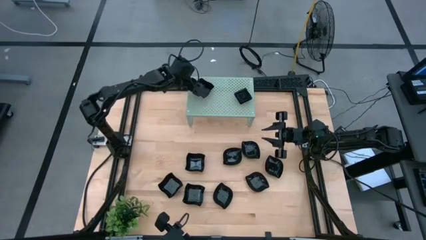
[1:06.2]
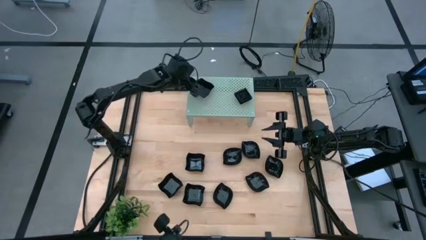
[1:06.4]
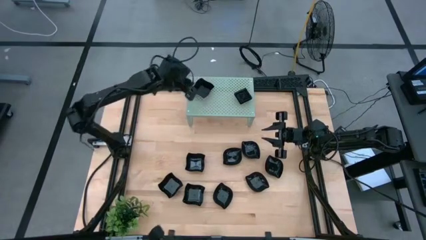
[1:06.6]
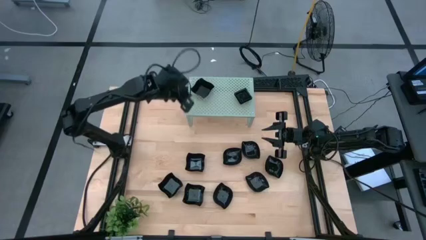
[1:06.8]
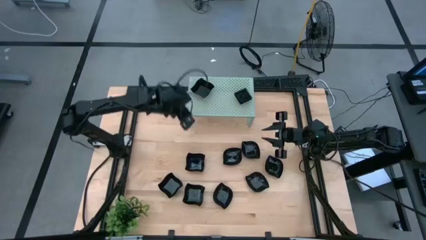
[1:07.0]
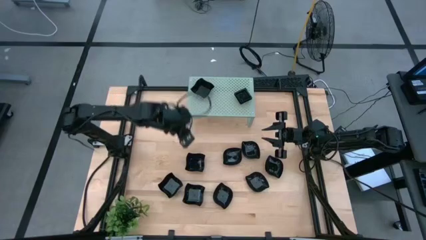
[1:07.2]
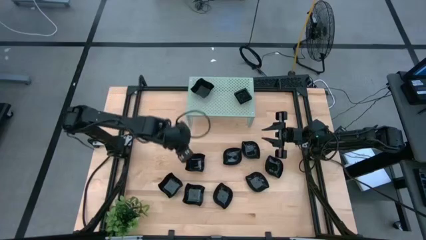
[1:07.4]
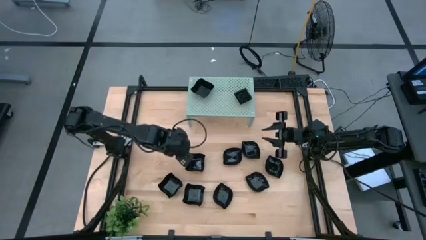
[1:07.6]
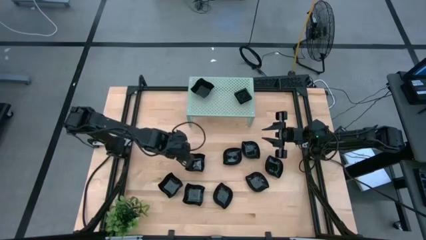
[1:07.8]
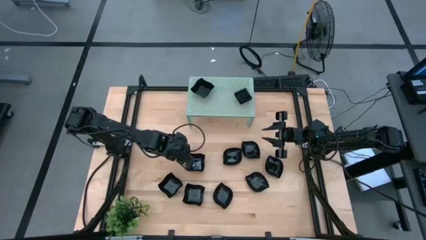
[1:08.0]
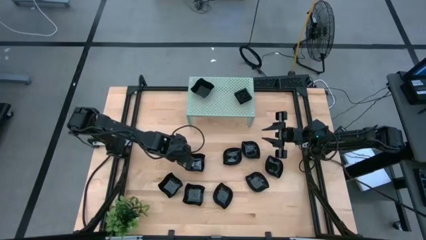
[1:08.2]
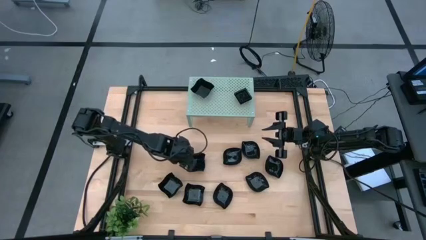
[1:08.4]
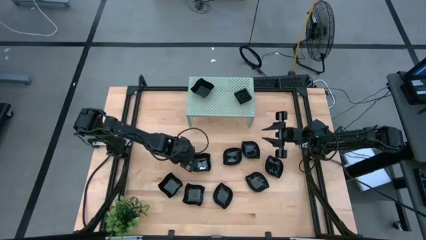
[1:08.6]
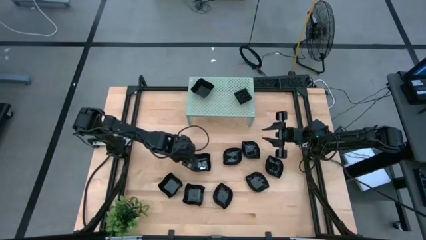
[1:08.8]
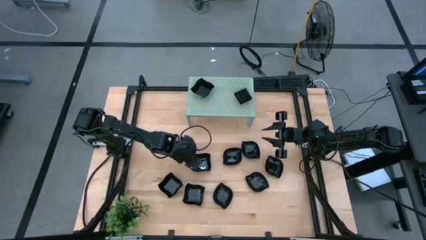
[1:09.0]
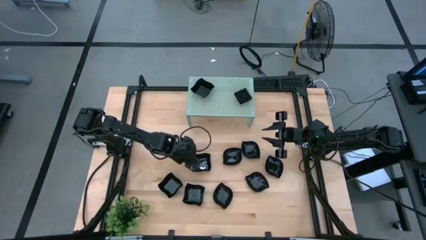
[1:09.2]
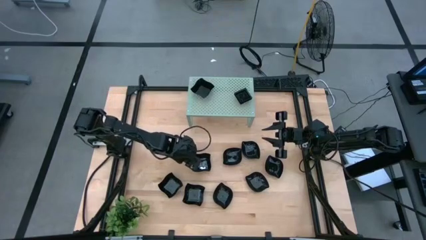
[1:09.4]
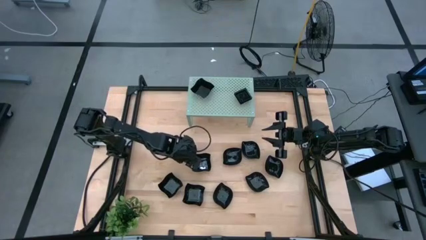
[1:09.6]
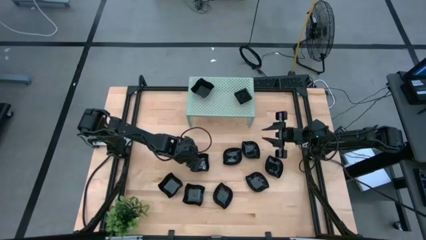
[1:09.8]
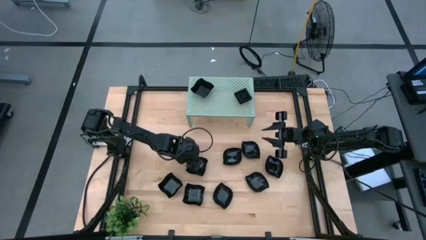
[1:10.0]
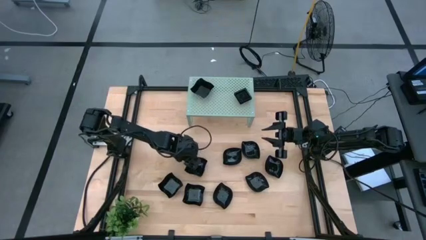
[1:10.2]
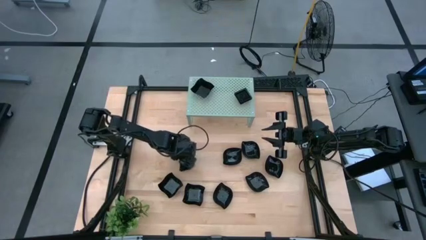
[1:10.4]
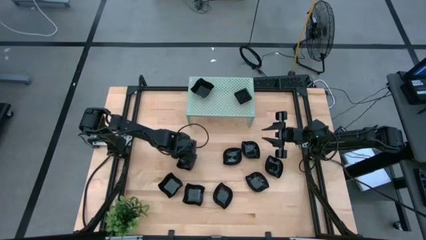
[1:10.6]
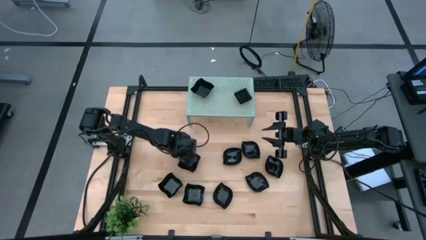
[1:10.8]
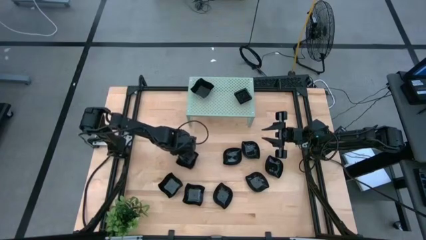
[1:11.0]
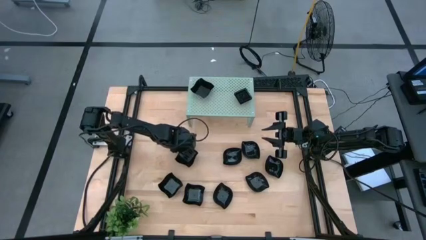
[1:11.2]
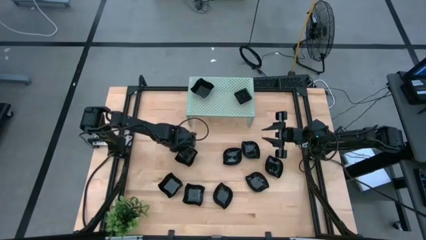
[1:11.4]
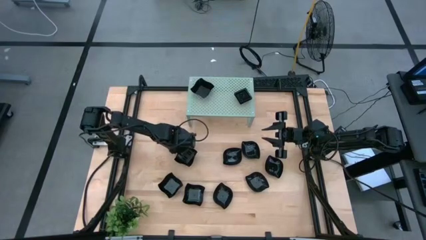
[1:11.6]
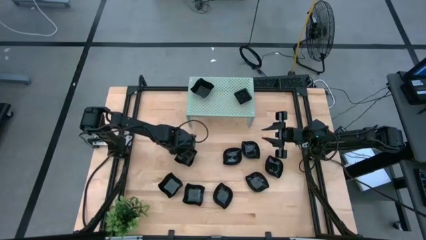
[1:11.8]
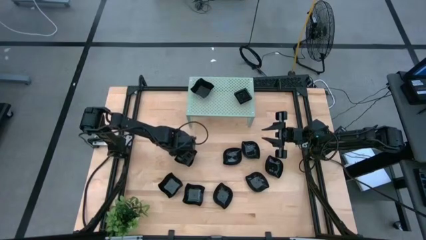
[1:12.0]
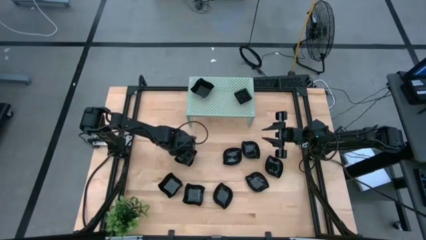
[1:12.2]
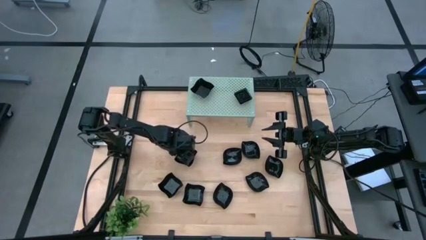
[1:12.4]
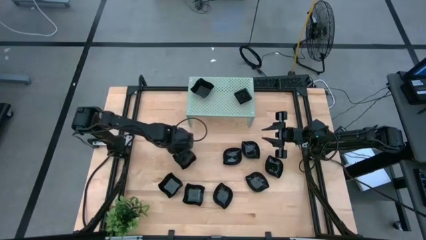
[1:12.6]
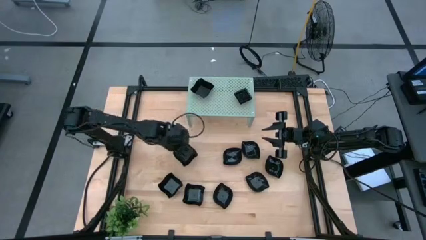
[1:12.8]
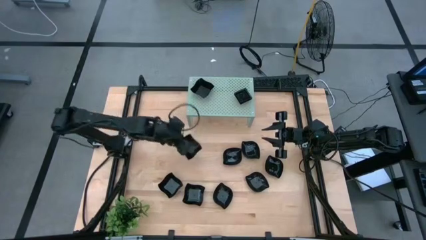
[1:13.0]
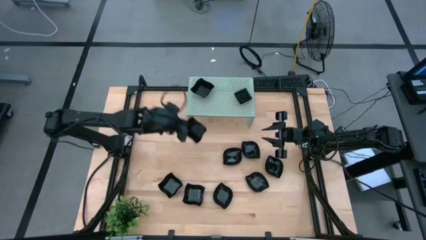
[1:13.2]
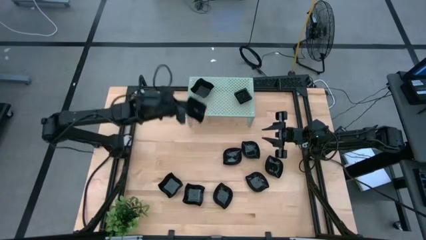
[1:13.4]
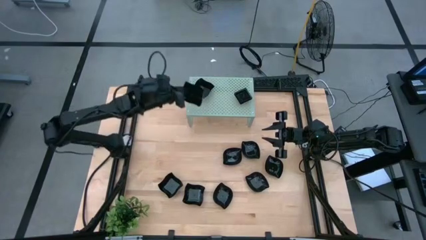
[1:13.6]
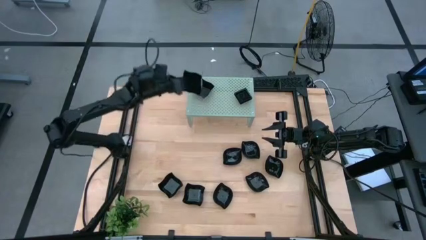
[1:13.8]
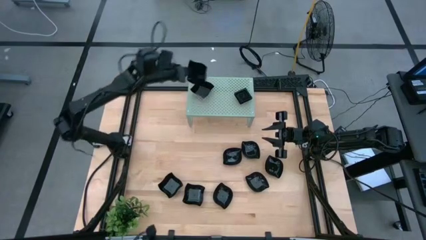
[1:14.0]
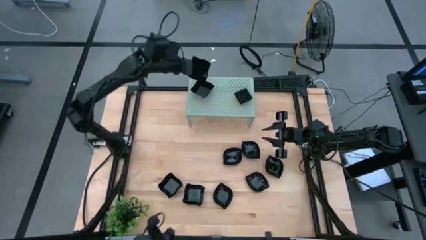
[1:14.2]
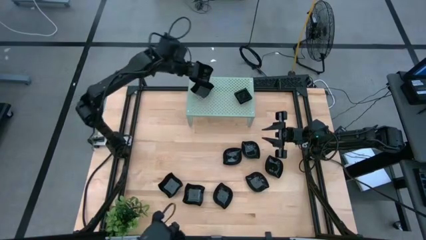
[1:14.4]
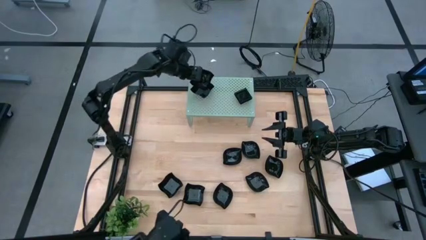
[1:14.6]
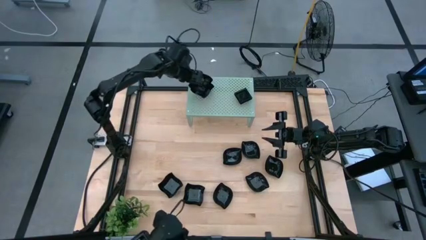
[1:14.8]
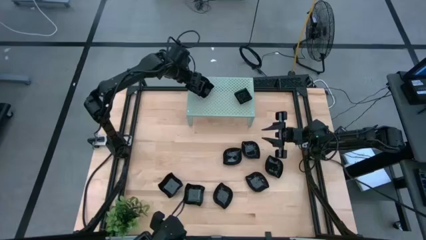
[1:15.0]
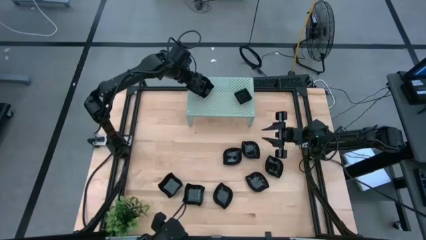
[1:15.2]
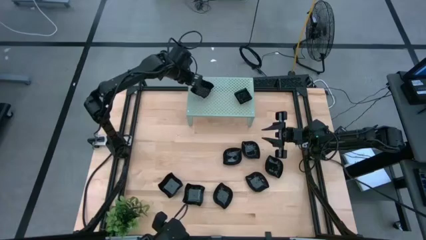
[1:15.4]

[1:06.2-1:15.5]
Task: Pick & Place Mini shaped plates
Stack the black distorted square plate on top of the other black distorted square plate on the shelf

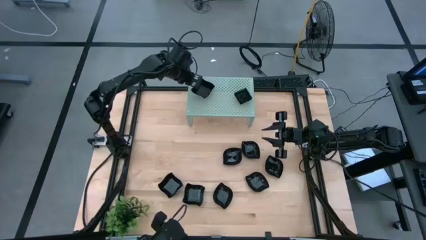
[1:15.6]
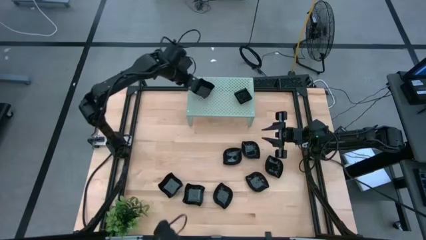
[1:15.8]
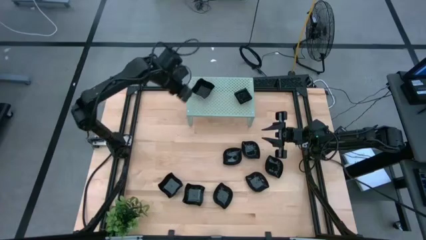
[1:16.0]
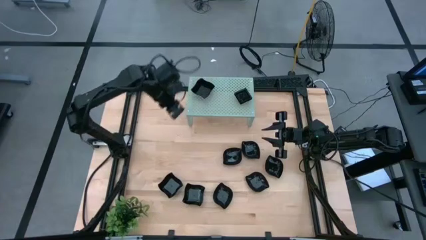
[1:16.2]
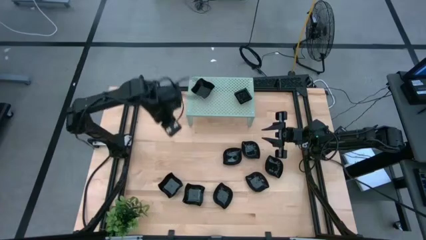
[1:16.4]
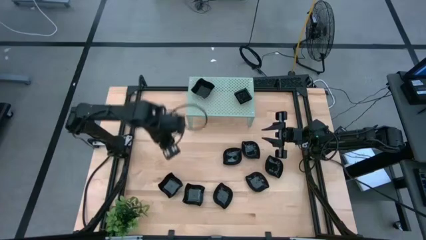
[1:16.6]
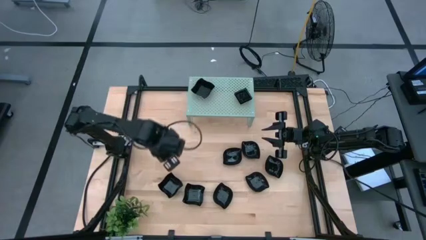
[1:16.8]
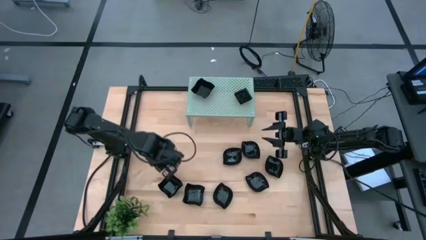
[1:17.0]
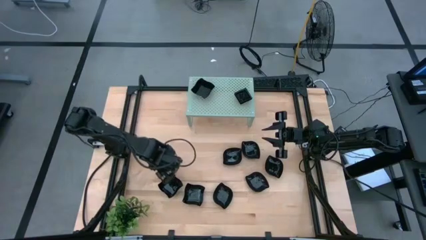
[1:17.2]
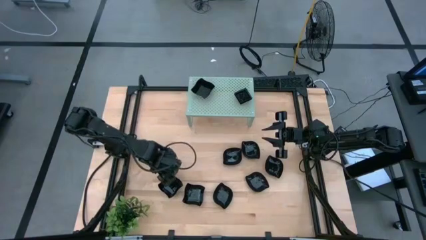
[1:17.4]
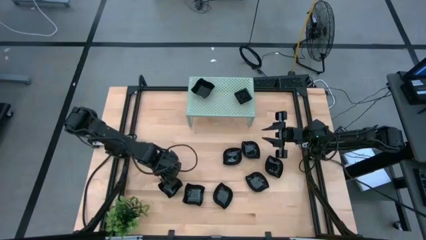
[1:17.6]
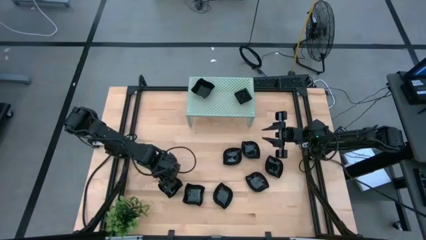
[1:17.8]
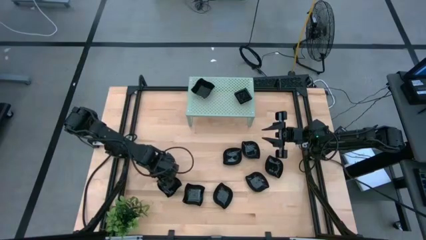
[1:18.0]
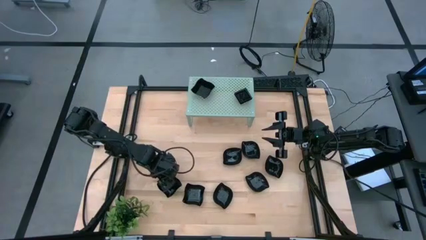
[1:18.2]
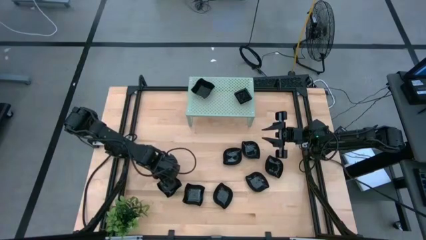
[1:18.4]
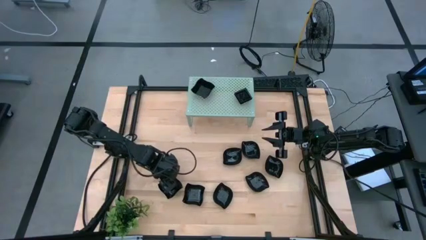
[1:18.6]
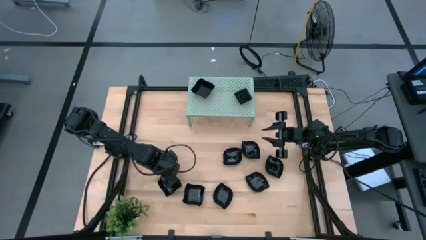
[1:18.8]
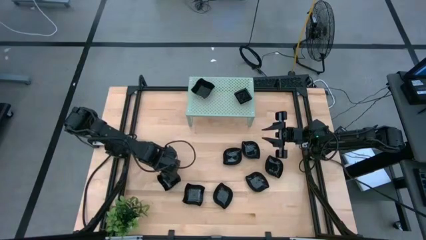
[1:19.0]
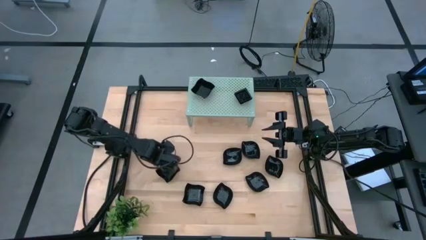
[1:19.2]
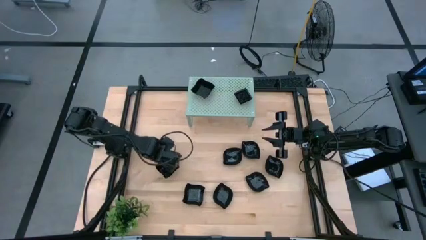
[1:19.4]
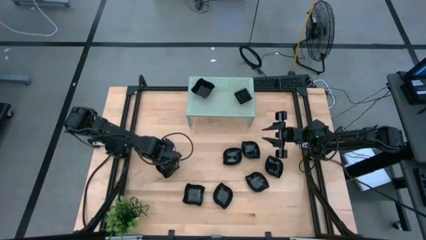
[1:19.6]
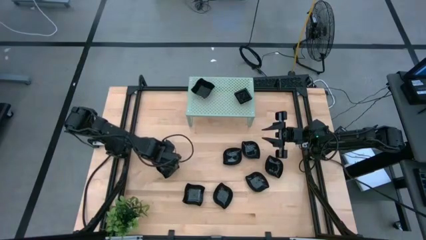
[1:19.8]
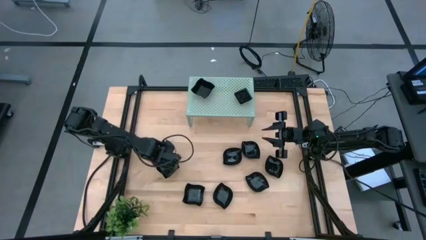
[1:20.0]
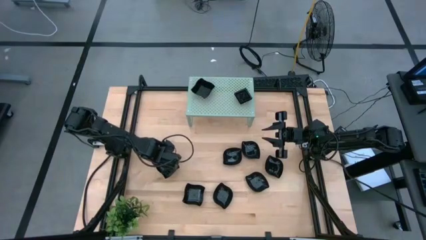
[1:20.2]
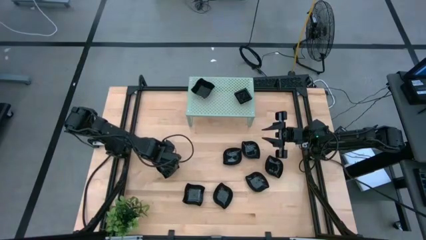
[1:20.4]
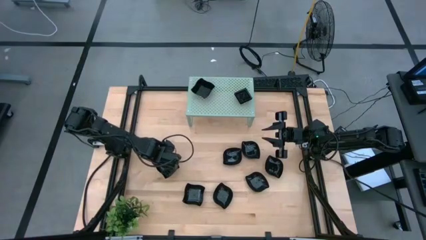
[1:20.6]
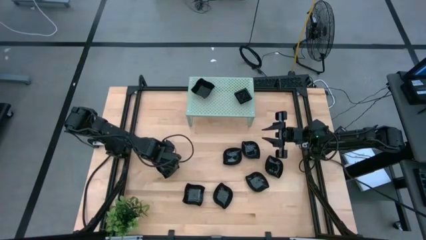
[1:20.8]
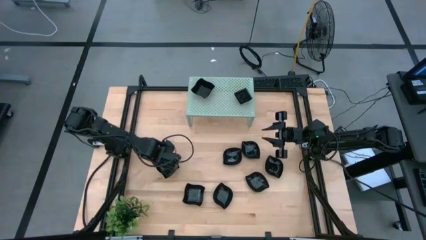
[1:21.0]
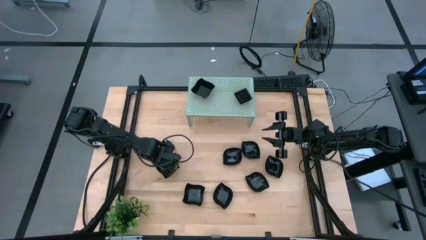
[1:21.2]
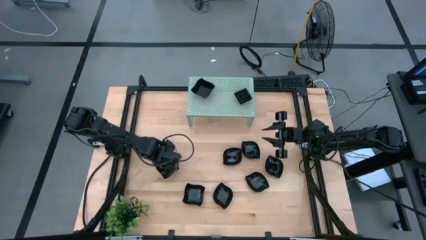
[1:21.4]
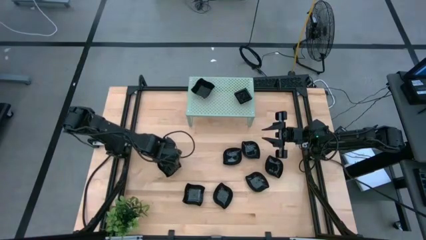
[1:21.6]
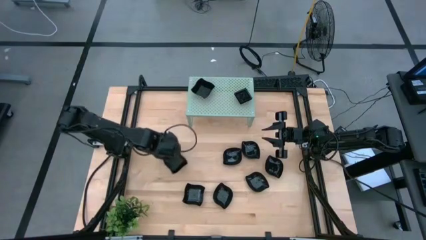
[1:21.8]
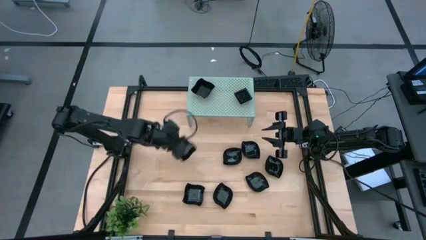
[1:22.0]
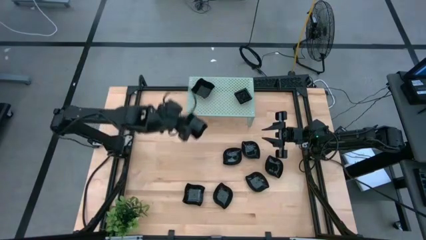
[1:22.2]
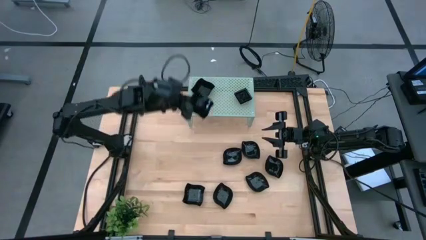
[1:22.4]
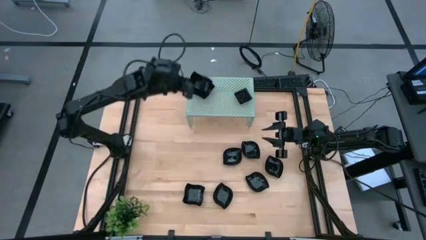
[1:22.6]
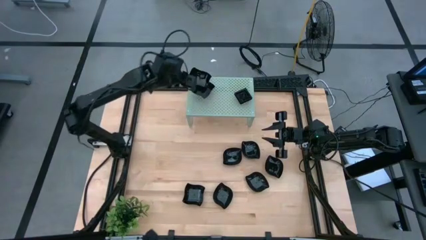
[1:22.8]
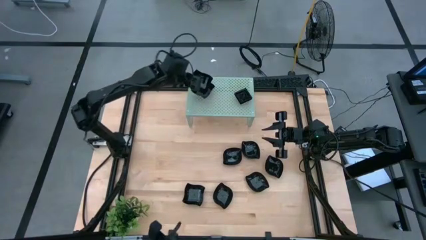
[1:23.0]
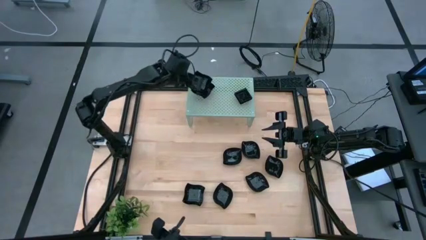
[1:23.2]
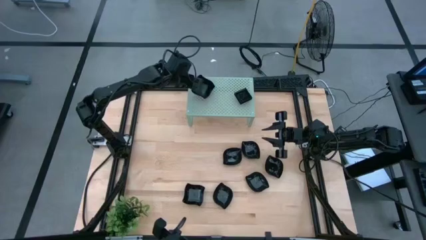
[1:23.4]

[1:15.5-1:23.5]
Stack the black distorted square plate on top of the other black distorted square plates on the shelf
